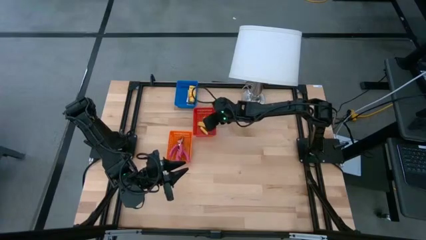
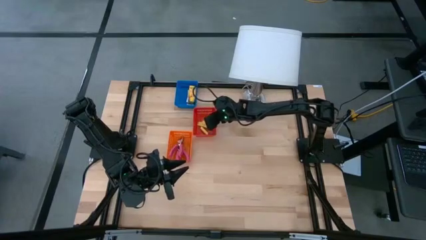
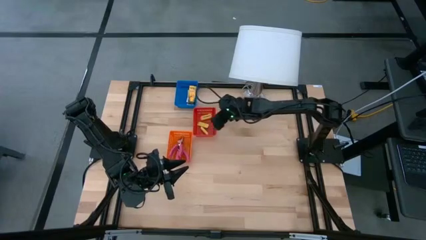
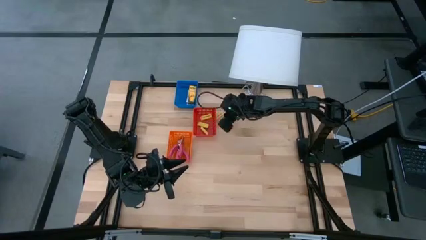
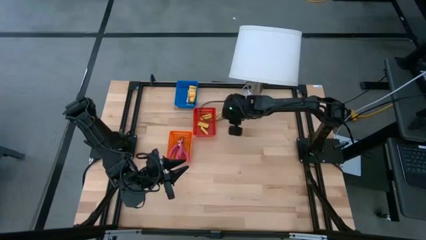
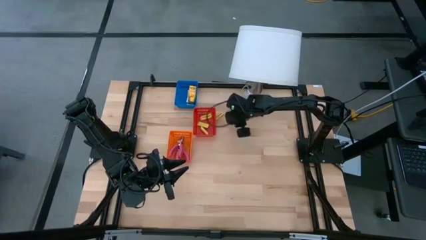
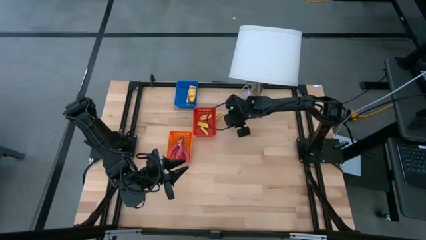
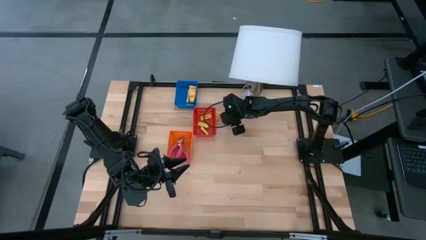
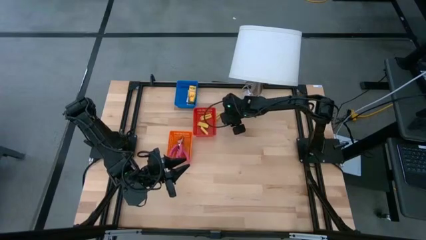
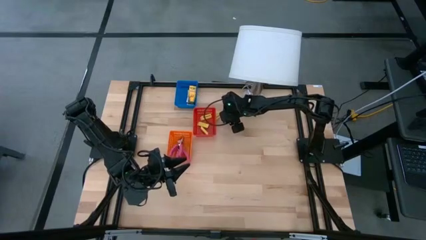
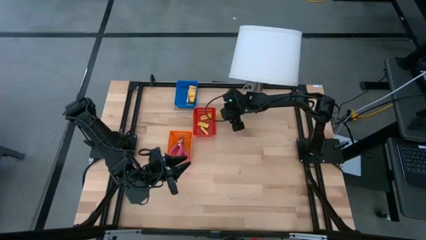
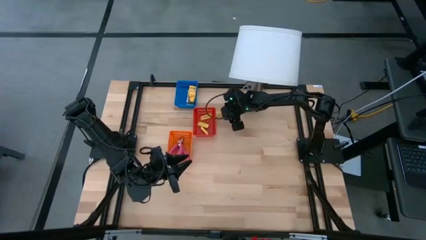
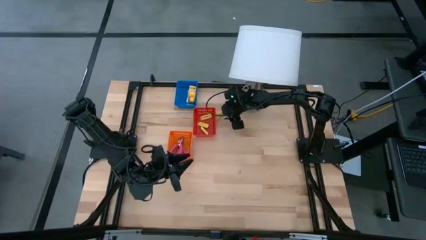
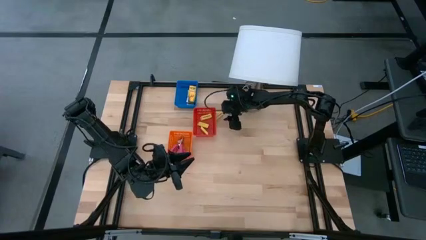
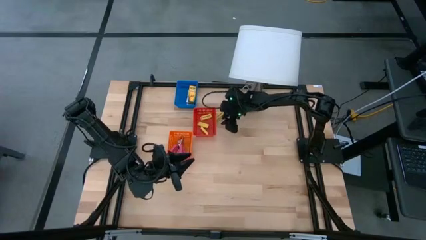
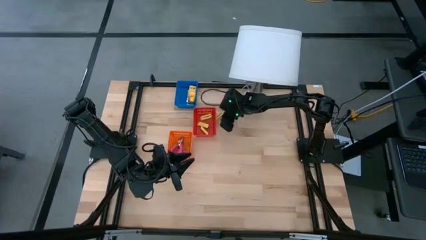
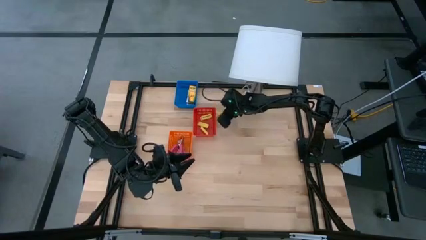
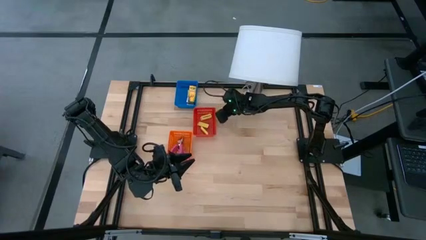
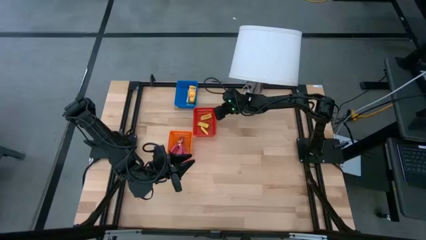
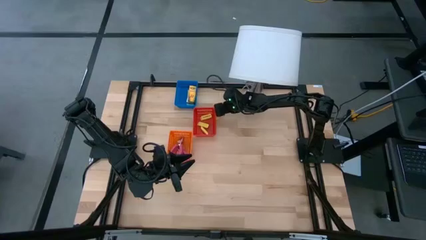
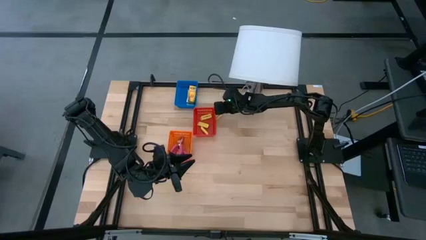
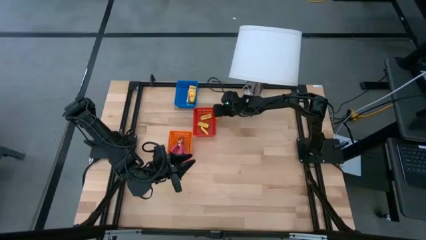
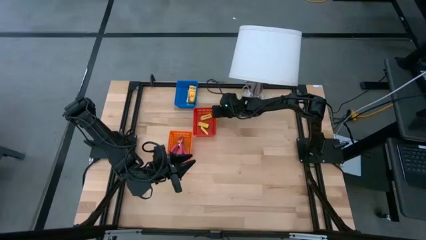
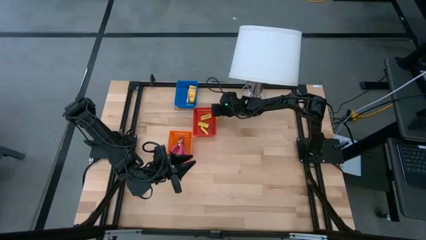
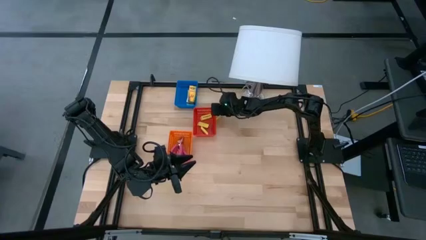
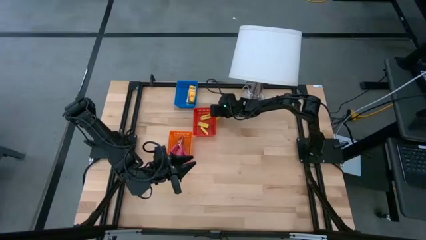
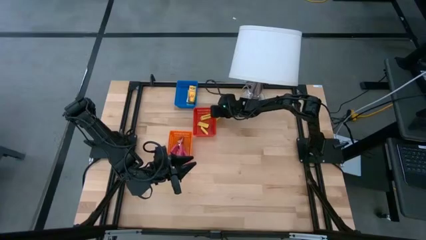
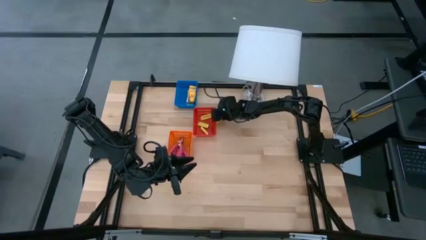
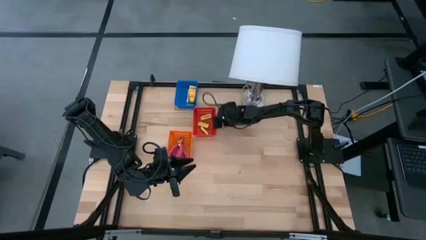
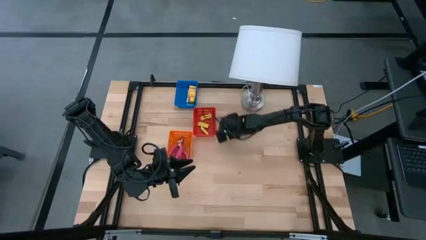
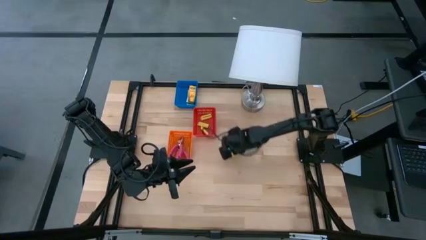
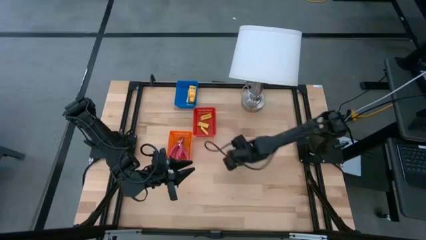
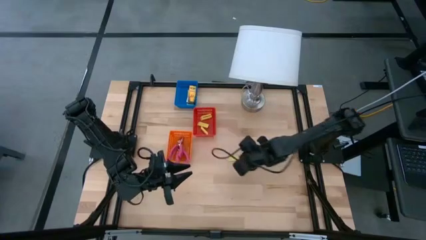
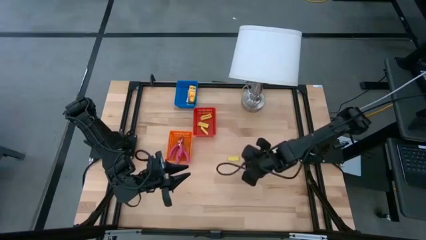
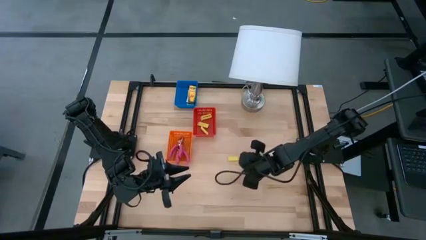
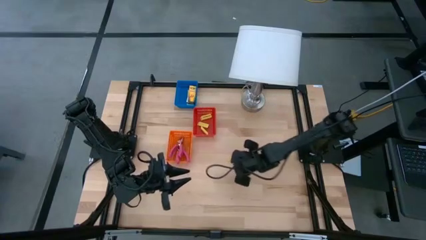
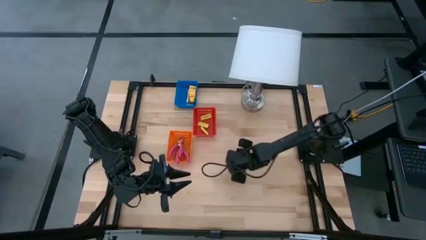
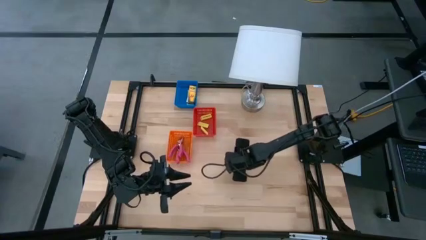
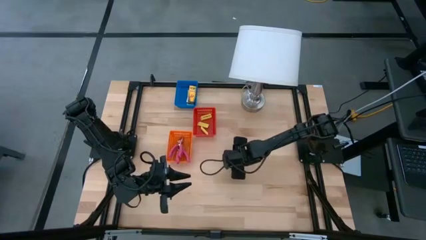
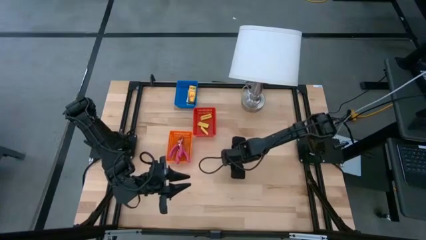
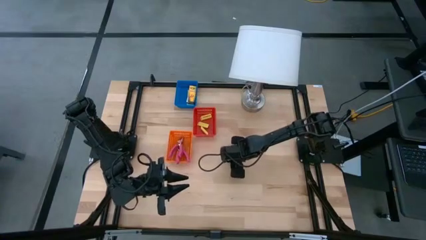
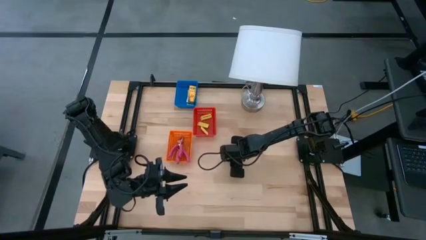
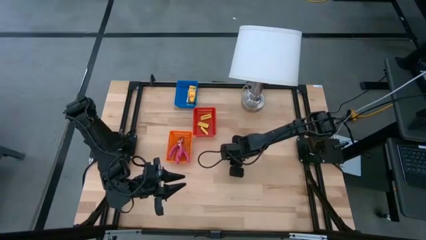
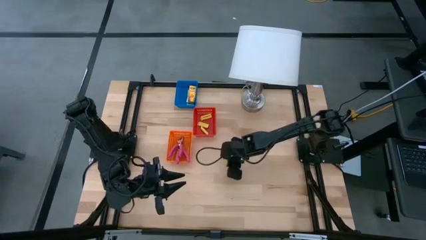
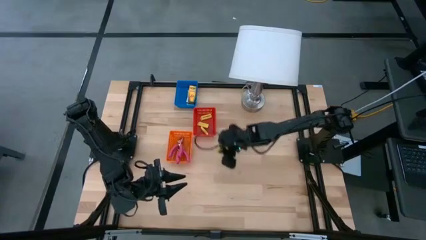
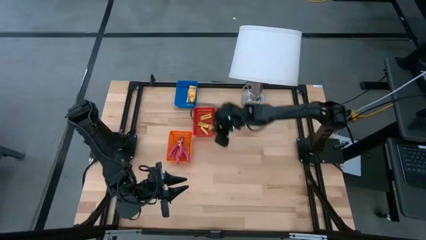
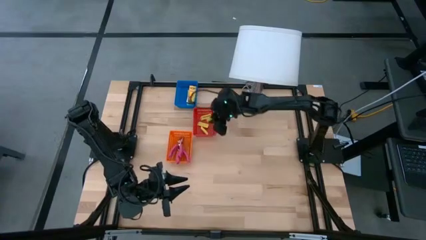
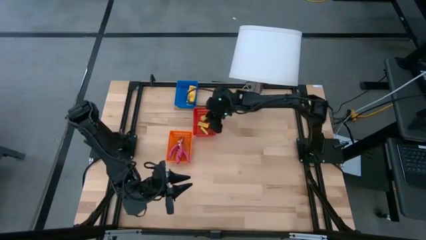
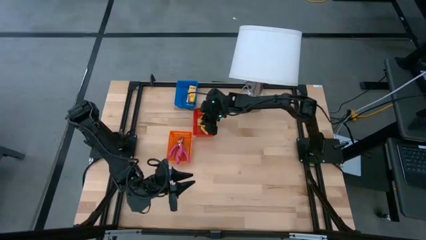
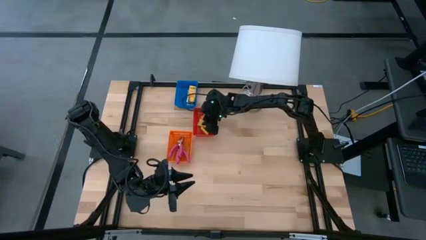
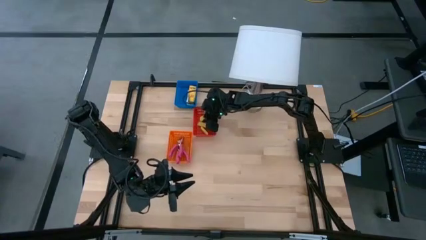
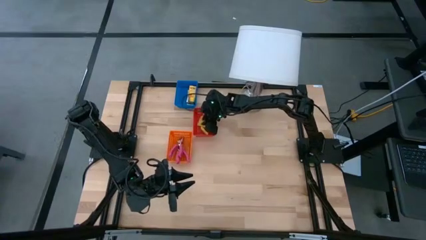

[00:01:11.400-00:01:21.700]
Task: Pick & Place School Supplies
Put the yellow eraser into the red bin

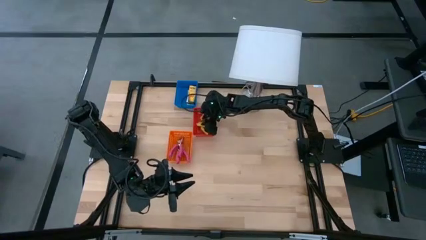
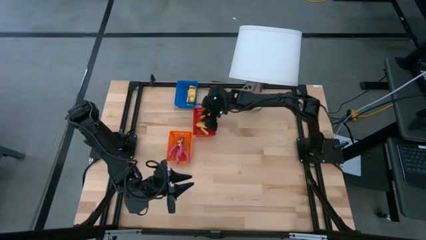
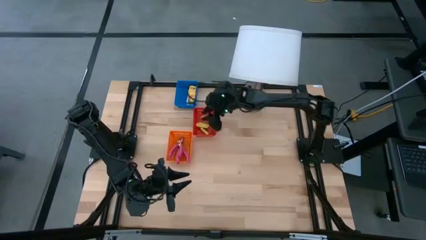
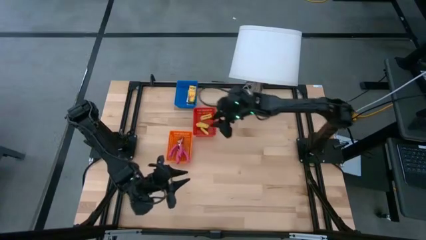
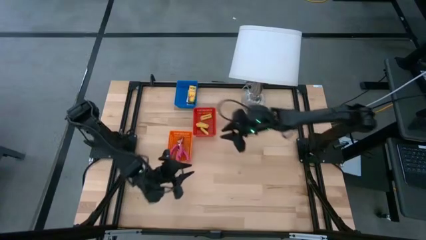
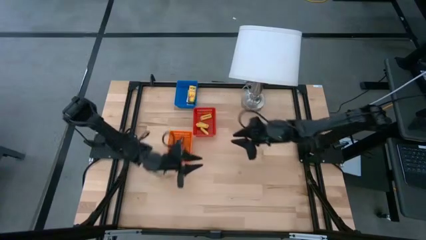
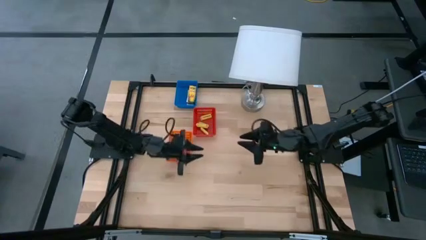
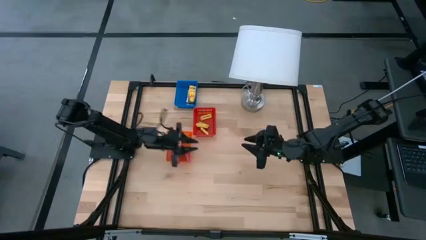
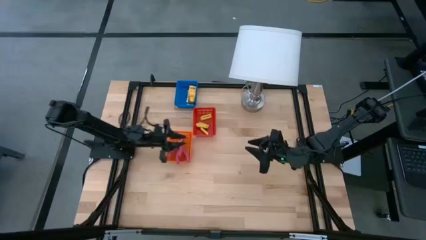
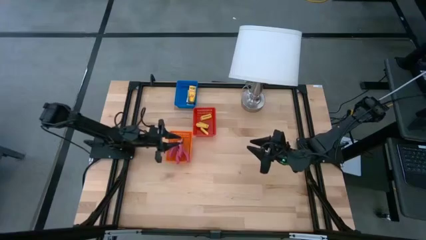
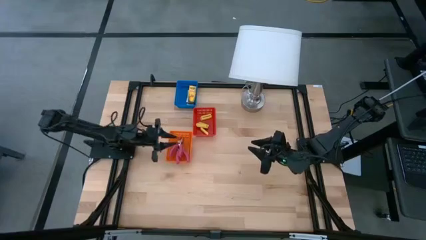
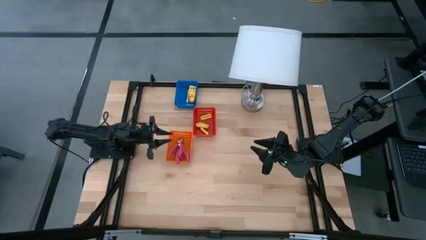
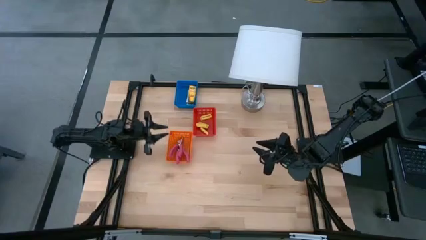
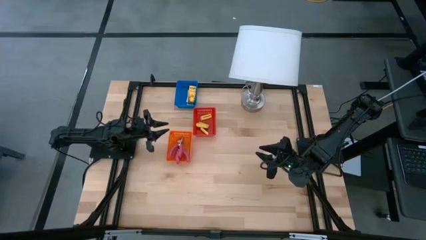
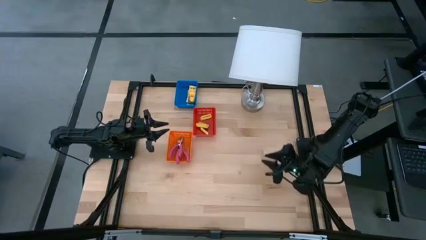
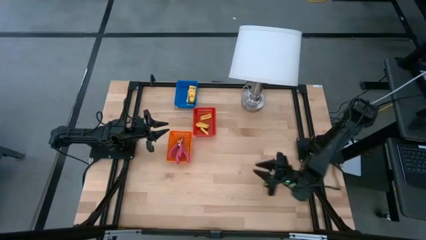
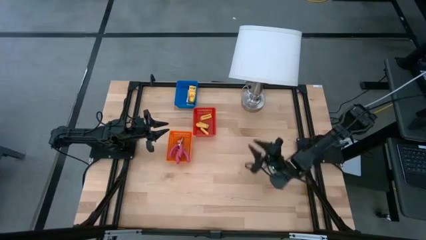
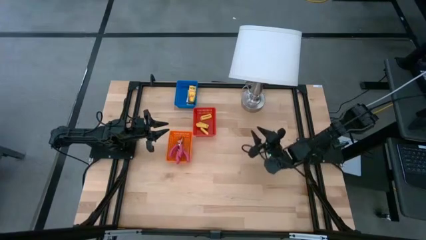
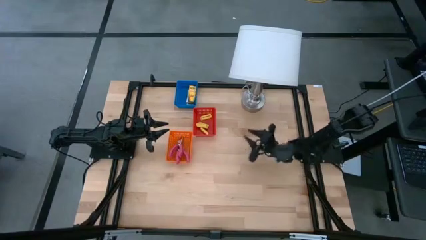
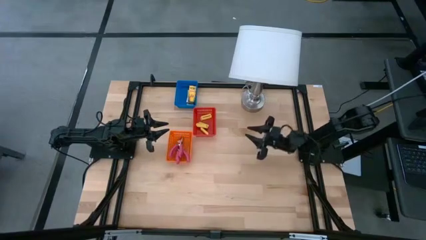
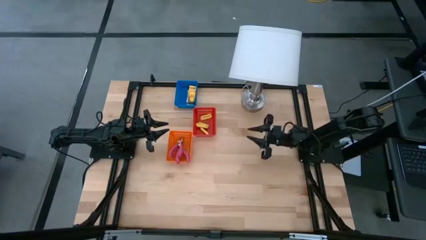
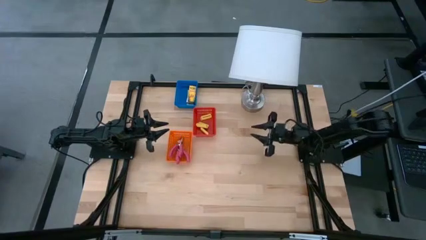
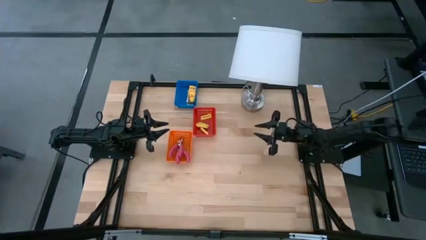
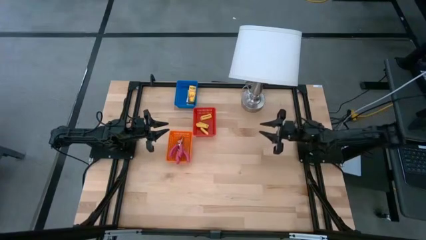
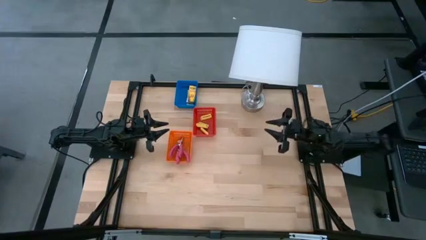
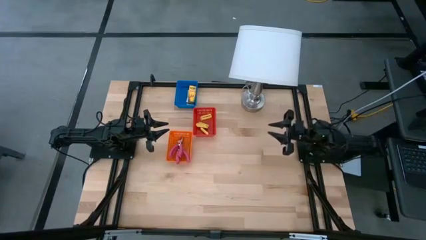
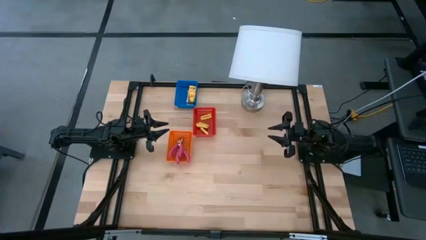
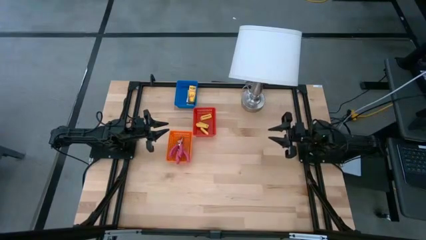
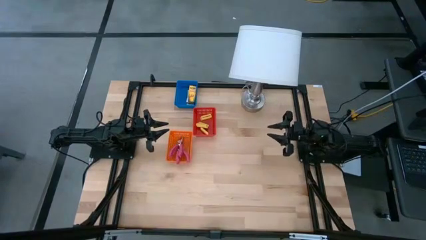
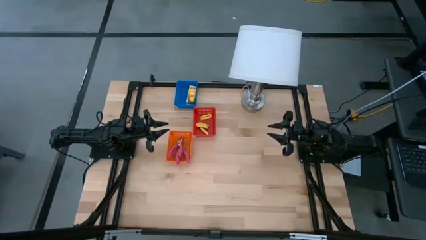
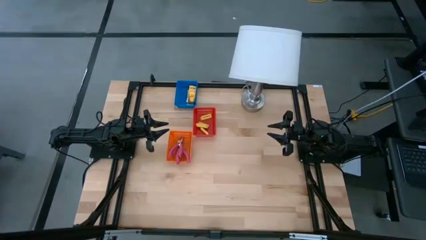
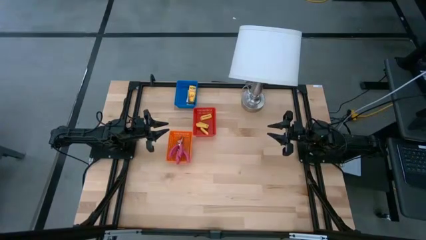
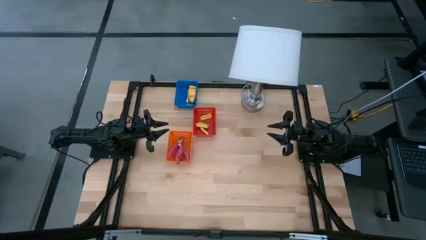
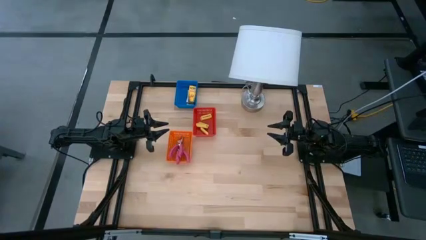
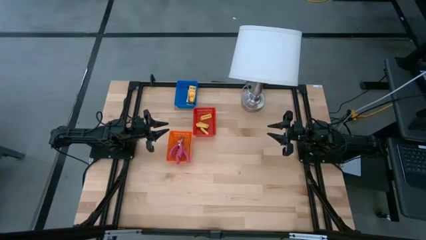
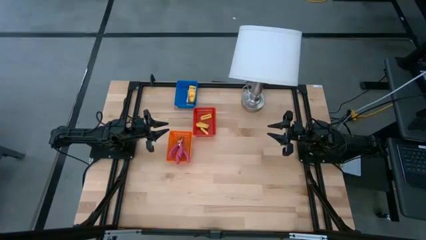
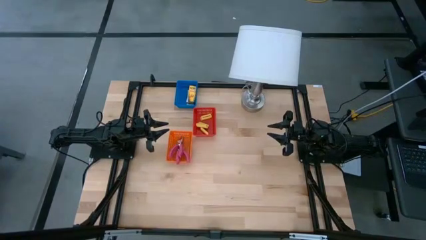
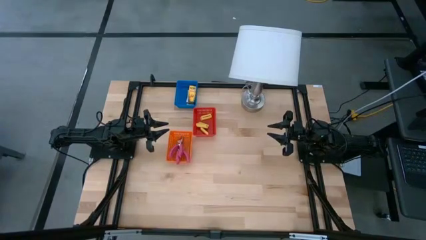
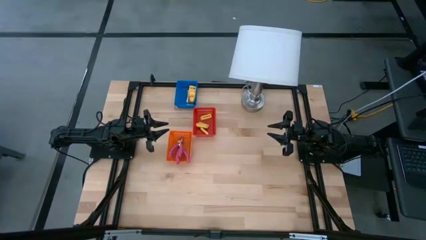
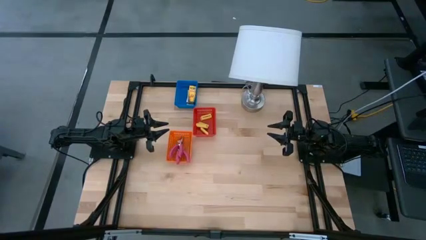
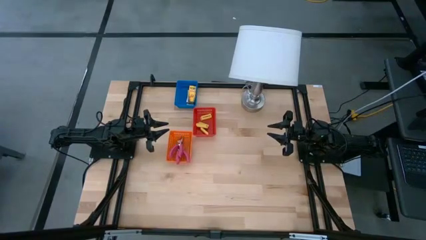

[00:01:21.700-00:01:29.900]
Return to Home Position
